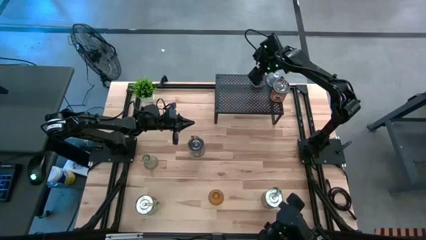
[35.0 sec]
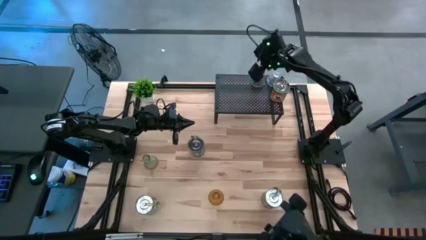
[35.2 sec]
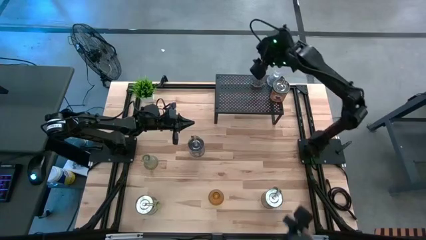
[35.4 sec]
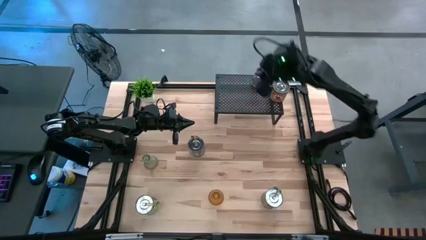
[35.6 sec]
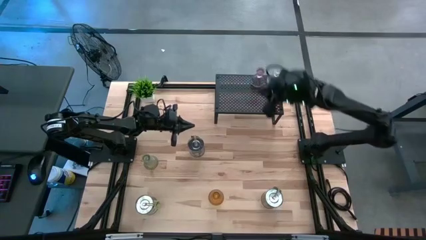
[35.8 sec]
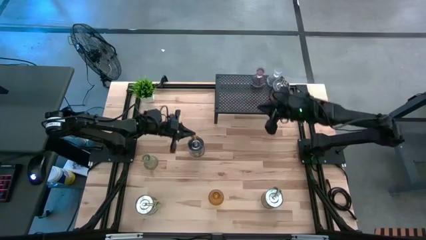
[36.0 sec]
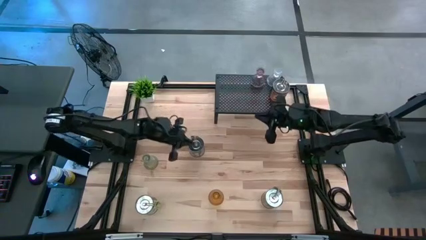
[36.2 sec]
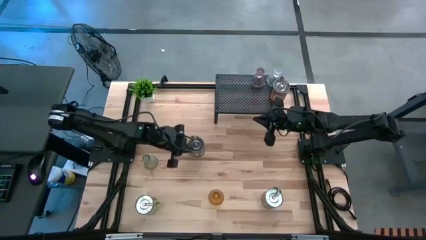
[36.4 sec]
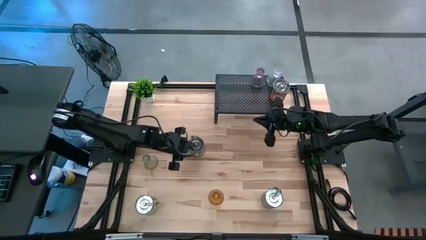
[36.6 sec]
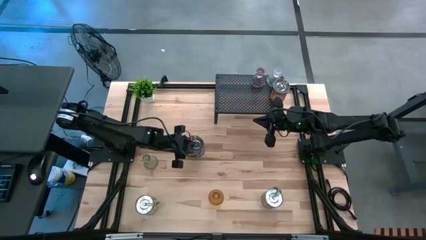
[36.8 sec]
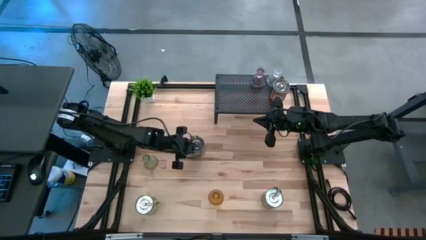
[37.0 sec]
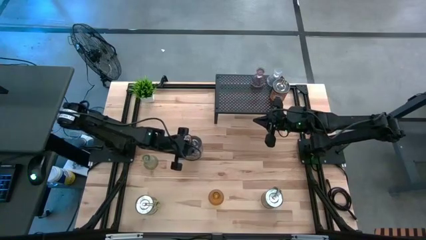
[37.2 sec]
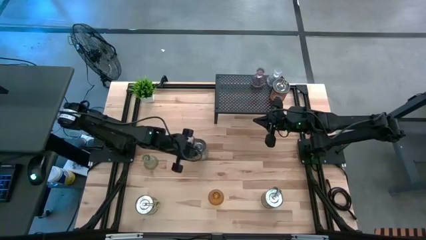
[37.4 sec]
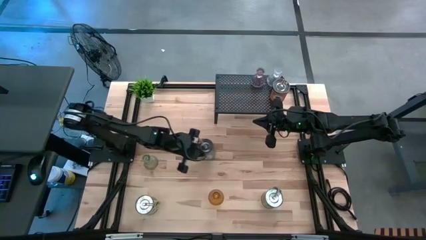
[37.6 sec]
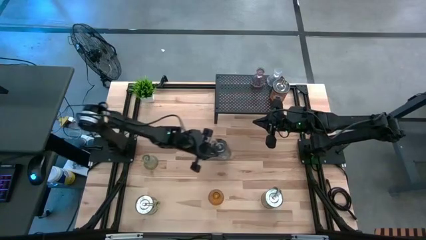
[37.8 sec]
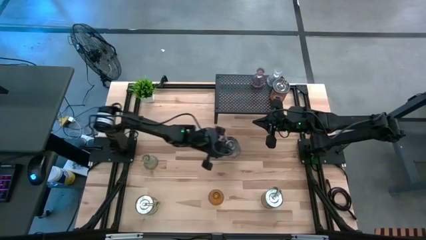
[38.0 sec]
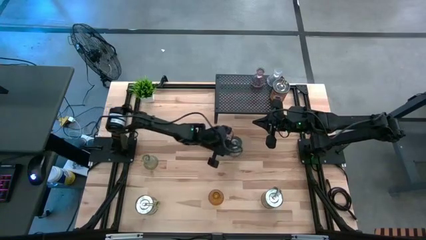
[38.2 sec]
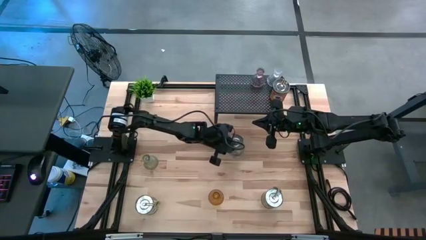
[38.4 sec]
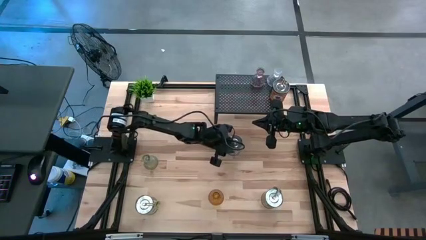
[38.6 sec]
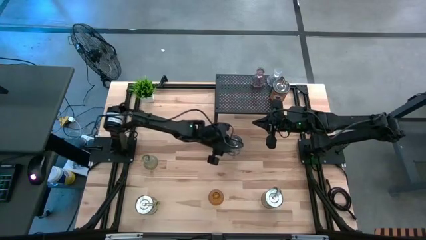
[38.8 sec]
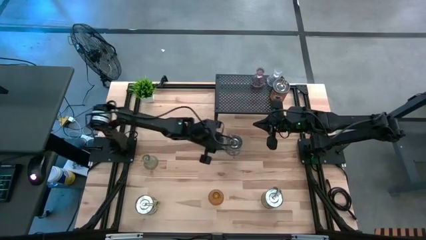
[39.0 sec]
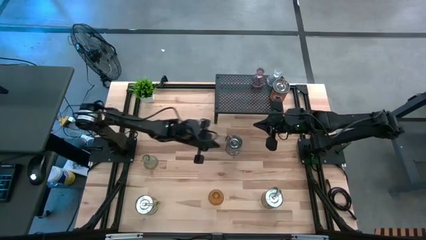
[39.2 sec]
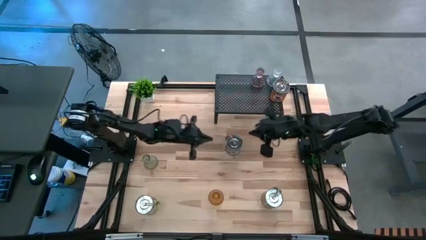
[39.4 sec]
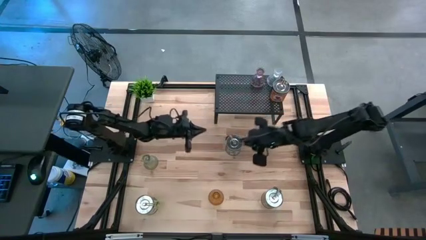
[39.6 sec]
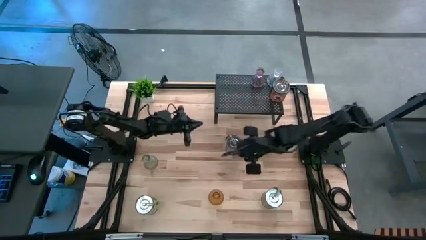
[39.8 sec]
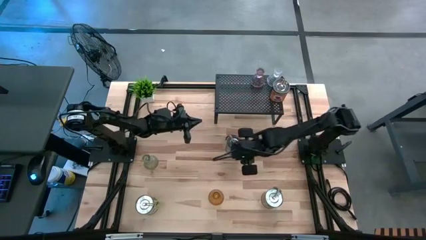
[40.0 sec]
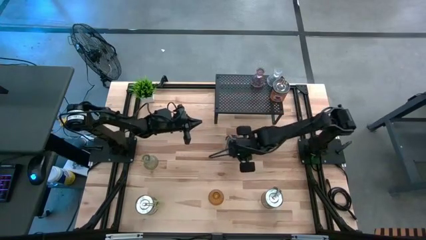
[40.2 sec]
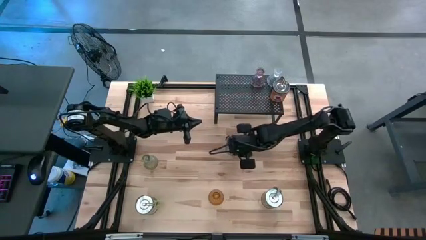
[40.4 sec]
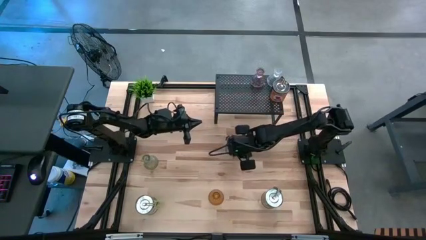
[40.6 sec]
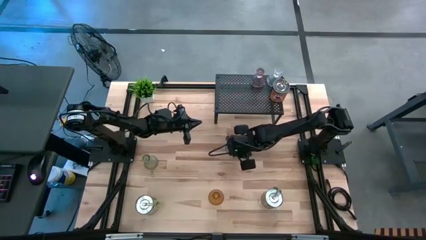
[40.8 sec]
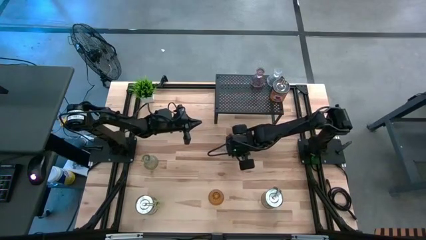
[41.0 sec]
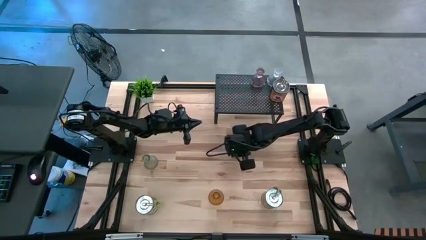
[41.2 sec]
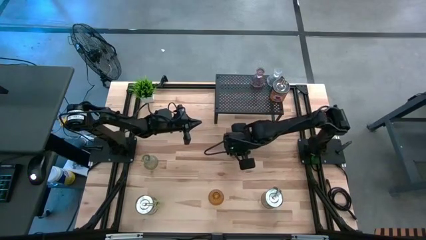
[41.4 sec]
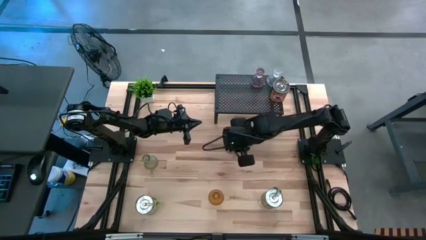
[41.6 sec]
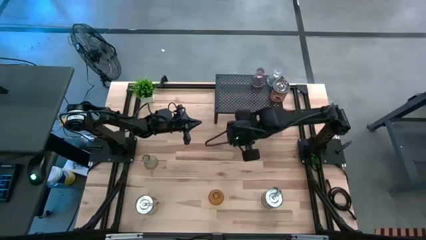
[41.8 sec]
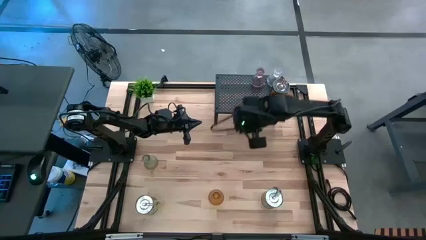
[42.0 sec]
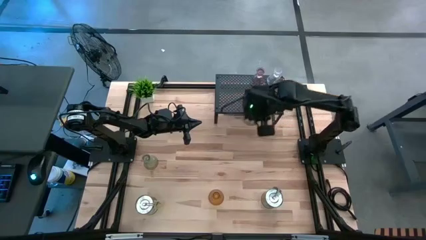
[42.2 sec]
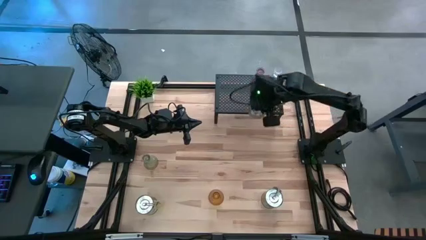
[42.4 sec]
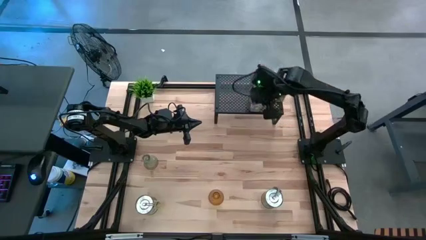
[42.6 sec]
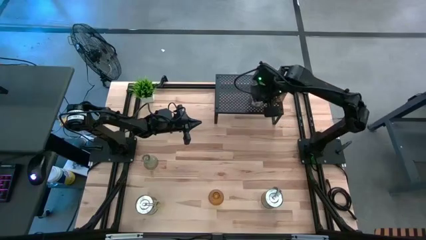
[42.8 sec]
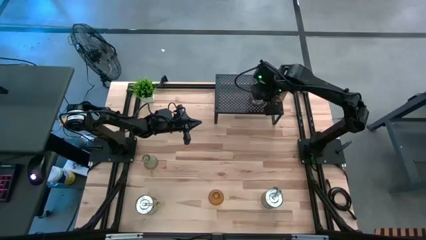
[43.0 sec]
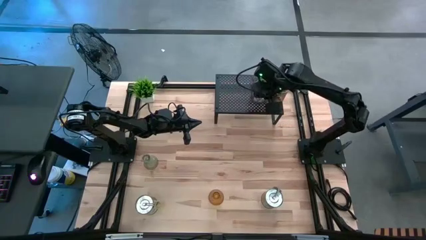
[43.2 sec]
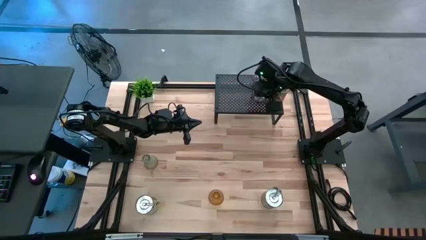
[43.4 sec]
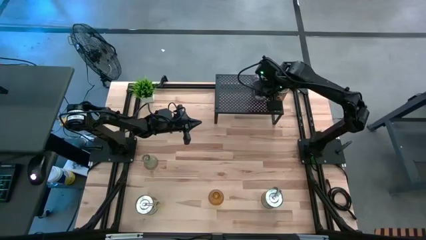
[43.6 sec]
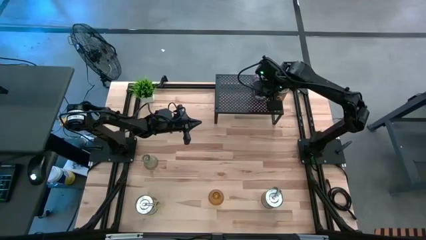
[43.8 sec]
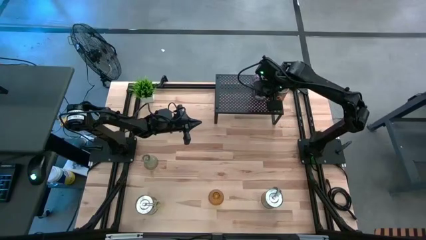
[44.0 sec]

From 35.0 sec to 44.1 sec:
Task: Pick & Place candle stick holders
Put the brown scented candle on the shelf aligned with the orange scented candle

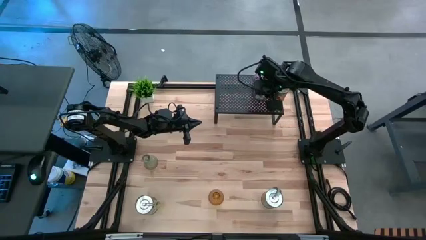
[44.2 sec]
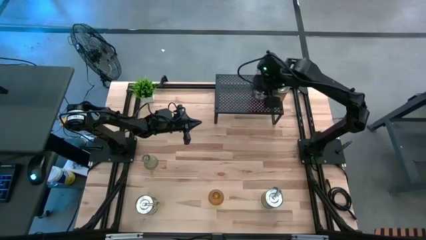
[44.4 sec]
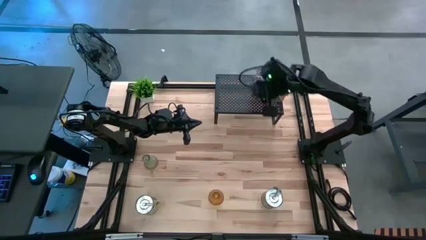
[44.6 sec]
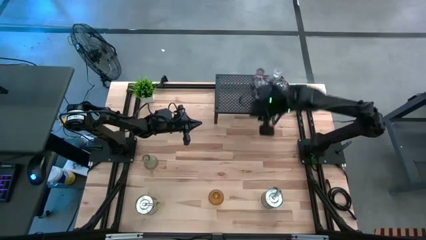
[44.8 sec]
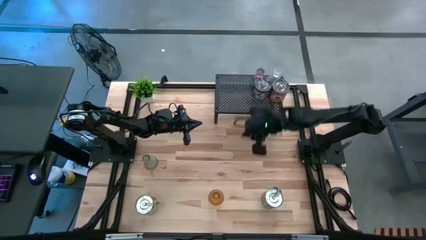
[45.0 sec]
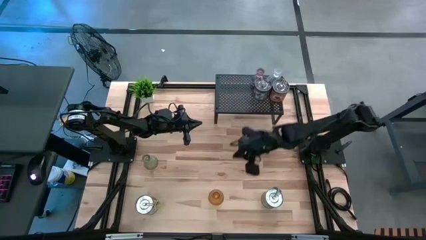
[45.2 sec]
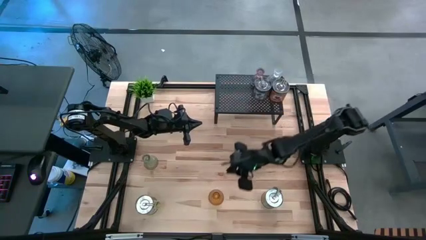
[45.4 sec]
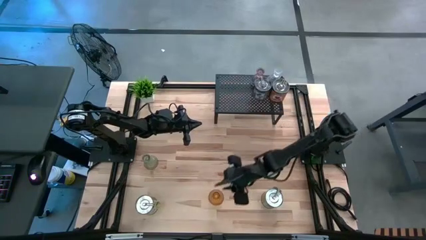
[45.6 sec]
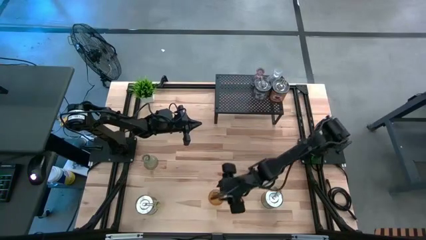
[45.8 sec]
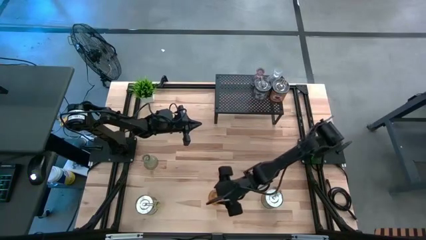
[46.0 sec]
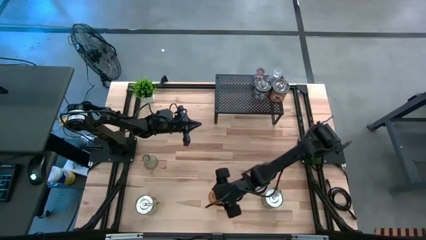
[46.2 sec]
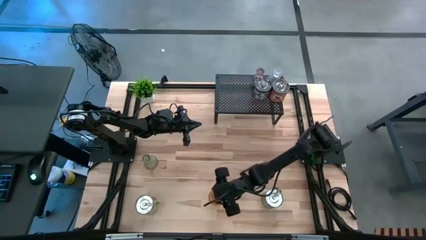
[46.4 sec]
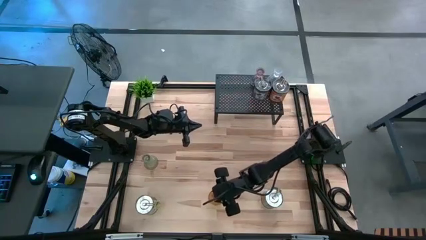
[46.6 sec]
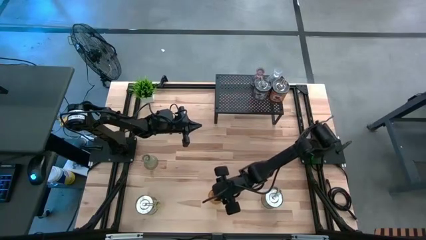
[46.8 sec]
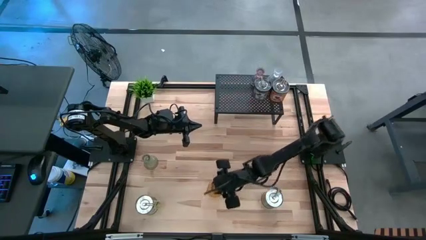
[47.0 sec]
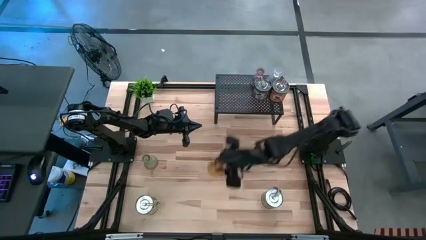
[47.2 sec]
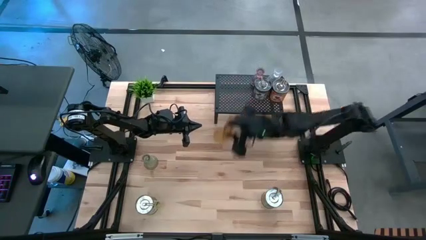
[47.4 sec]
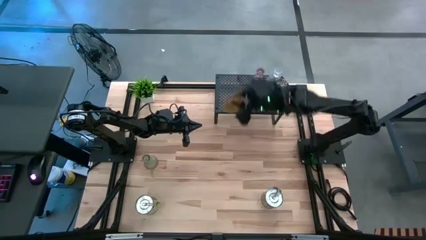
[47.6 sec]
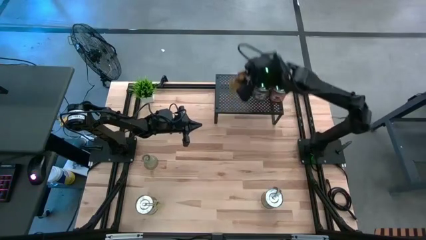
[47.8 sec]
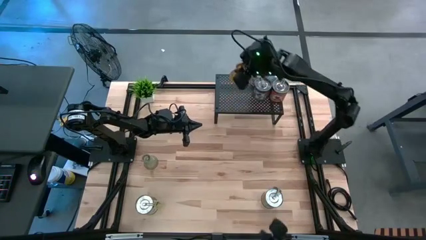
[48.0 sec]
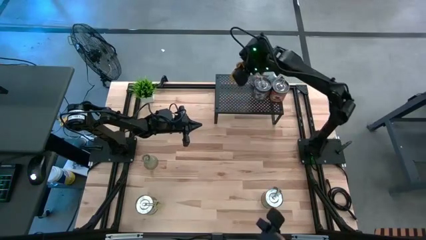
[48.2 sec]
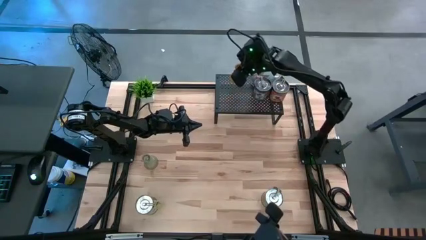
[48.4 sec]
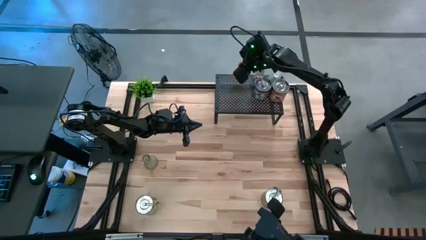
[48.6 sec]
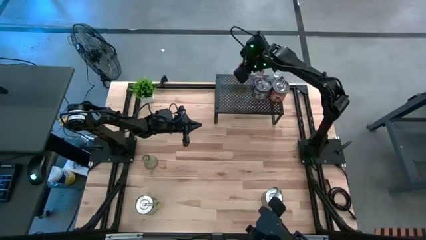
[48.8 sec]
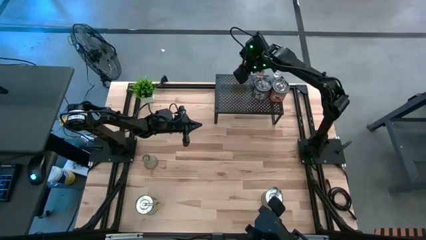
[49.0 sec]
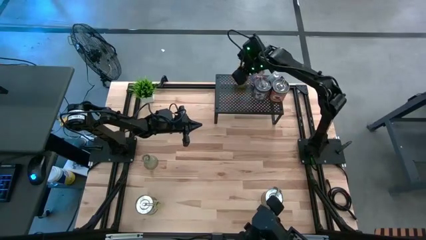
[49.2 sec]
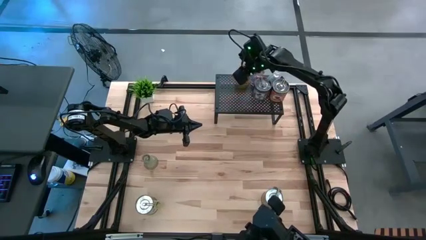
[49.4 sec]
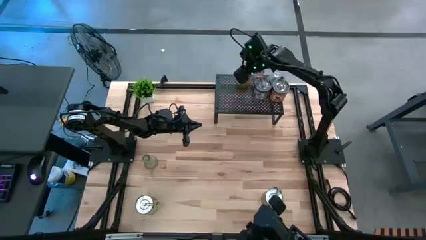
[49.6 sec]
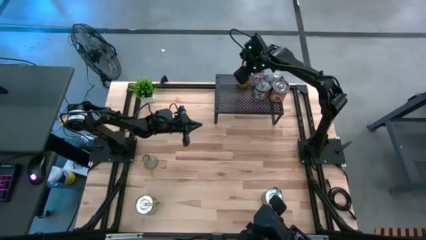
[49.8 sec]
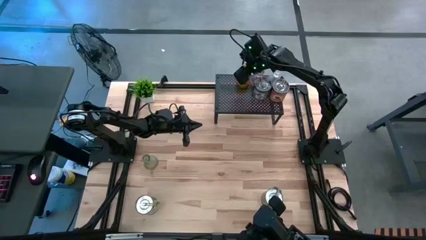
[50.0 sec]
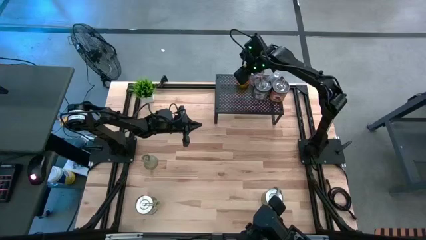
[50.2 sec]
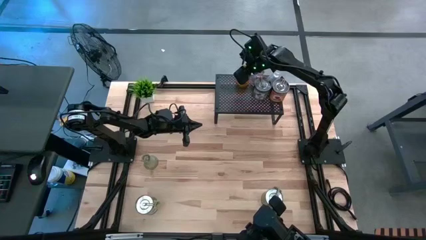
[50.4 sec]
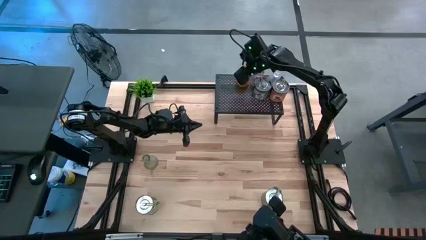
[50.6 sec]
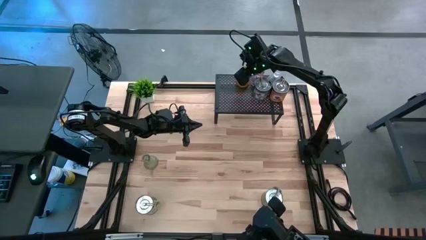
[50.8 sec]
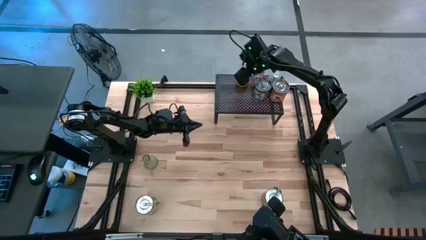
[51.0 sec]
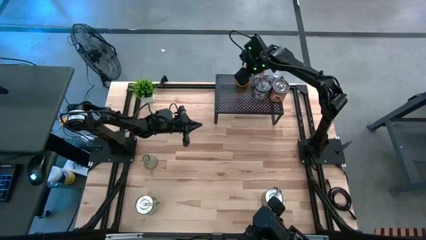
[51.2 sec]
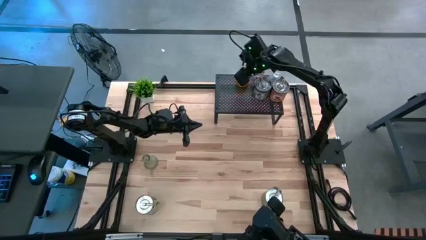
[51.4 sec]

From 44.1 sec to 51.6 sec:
Put the orange candle holder on the shelf aligned with the purple candle holder
